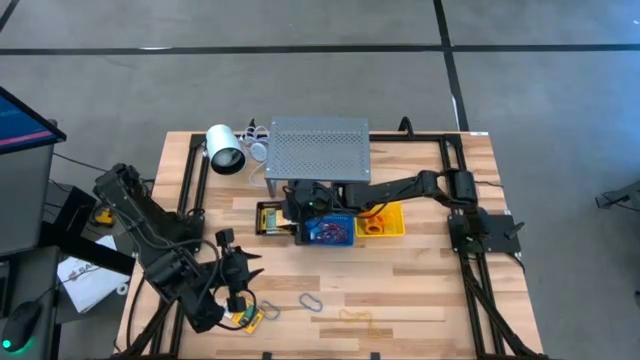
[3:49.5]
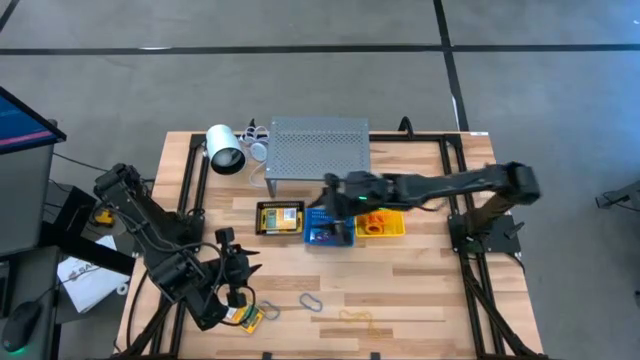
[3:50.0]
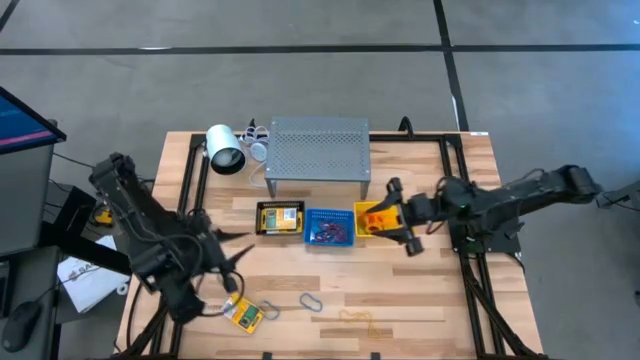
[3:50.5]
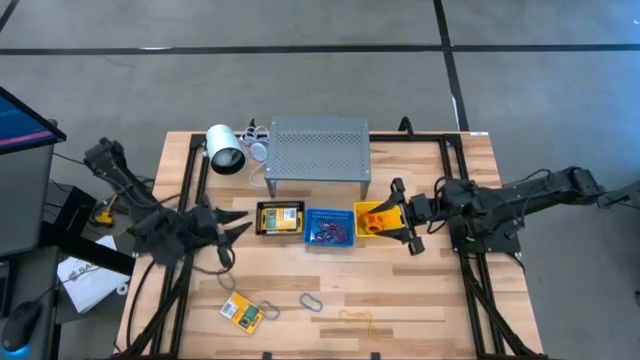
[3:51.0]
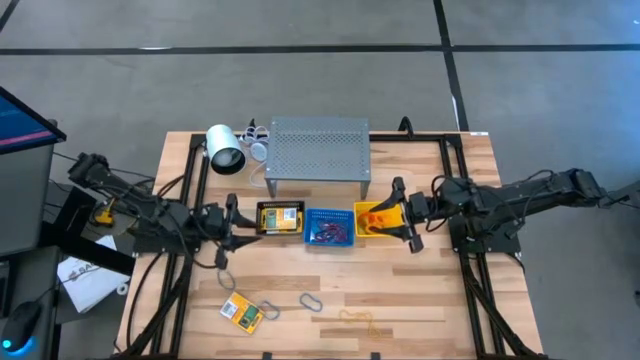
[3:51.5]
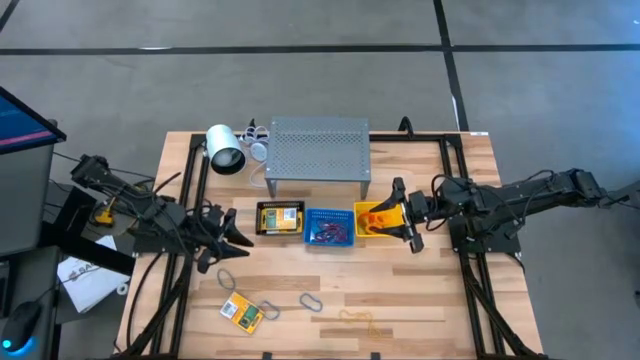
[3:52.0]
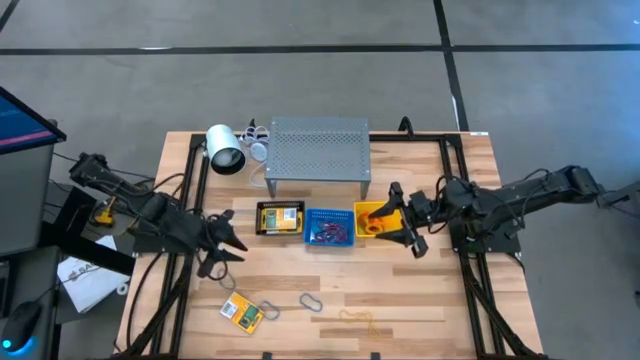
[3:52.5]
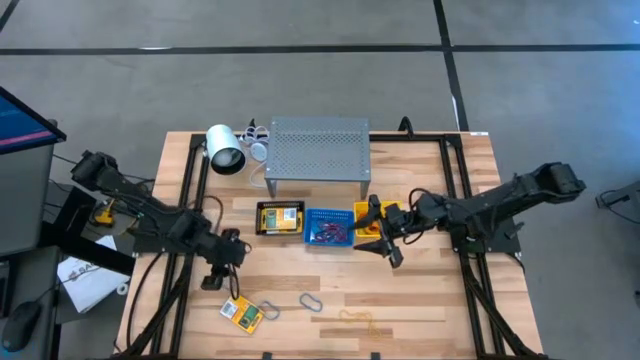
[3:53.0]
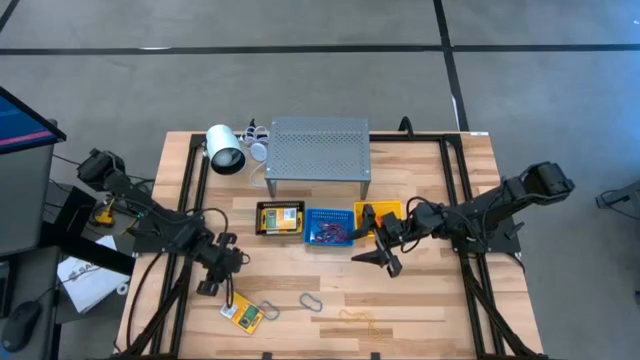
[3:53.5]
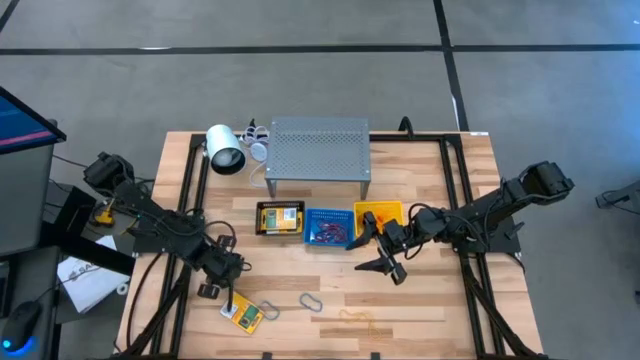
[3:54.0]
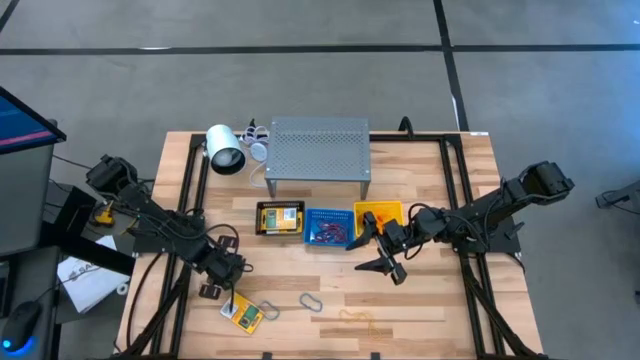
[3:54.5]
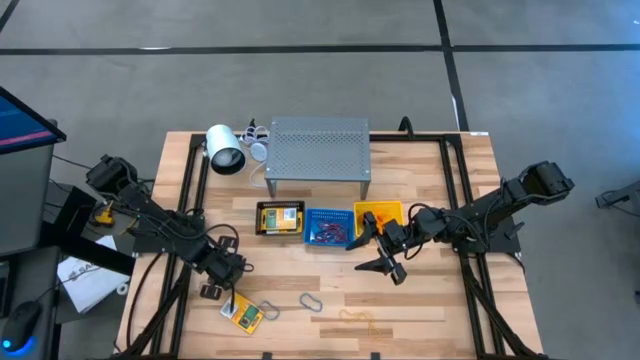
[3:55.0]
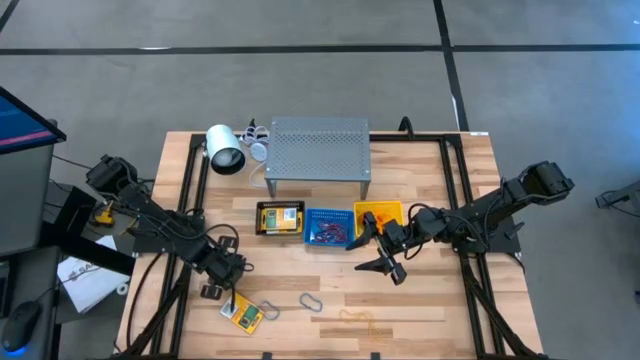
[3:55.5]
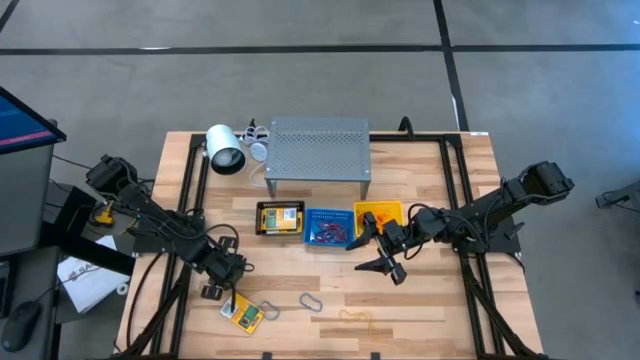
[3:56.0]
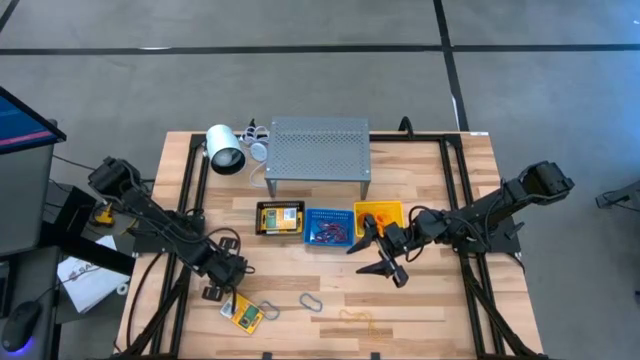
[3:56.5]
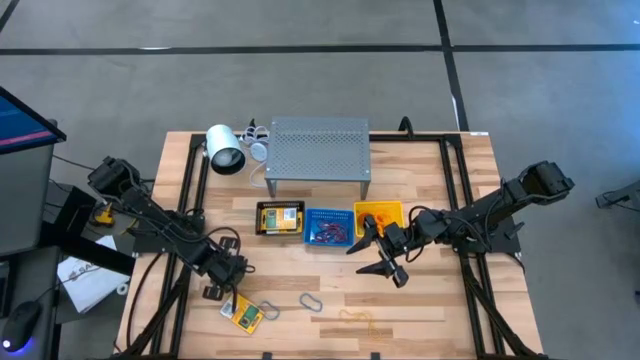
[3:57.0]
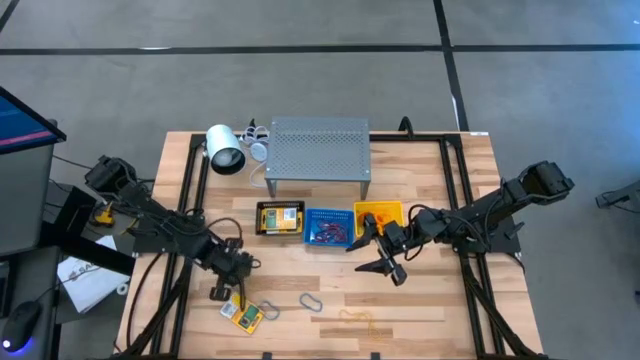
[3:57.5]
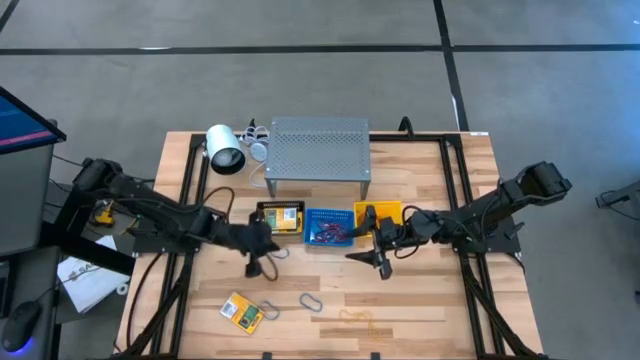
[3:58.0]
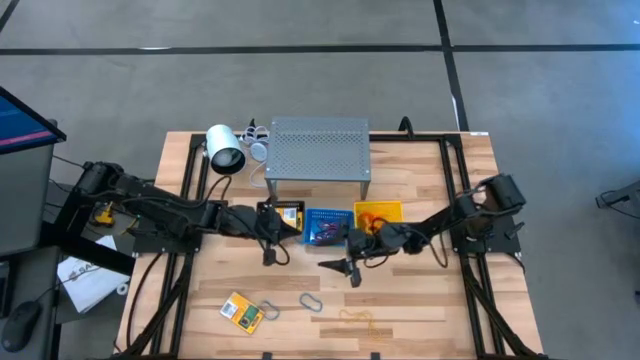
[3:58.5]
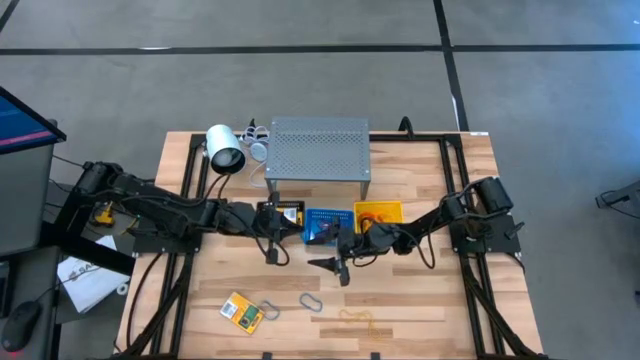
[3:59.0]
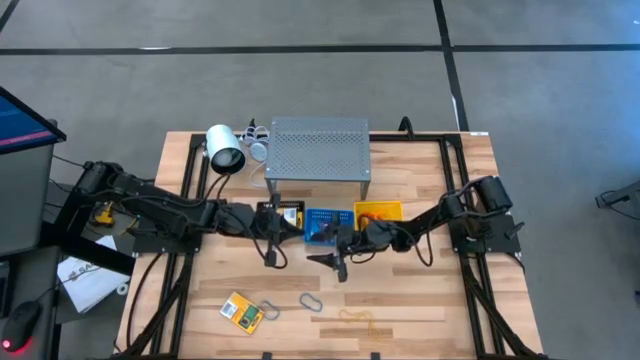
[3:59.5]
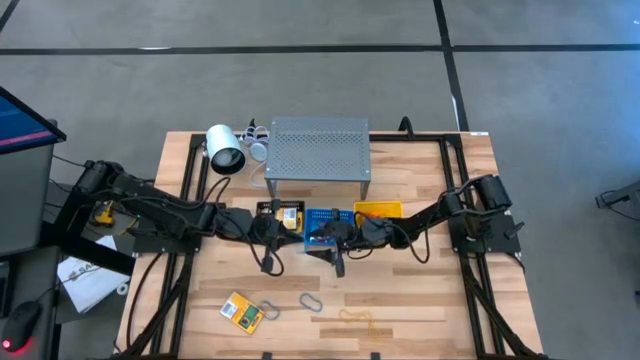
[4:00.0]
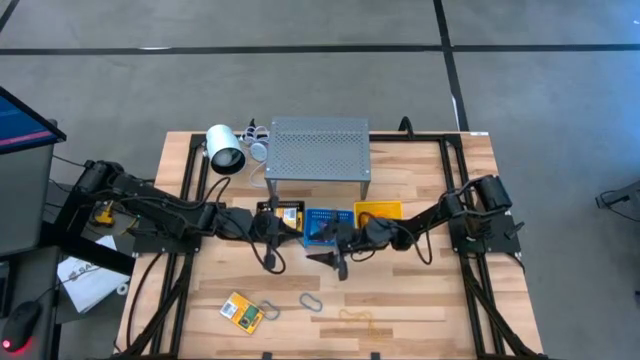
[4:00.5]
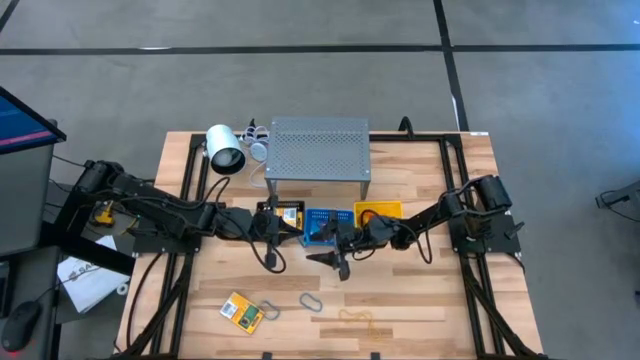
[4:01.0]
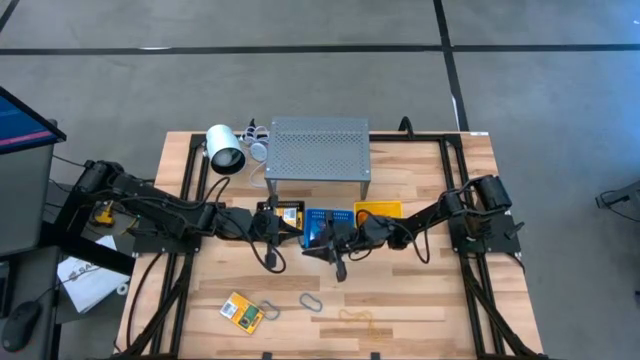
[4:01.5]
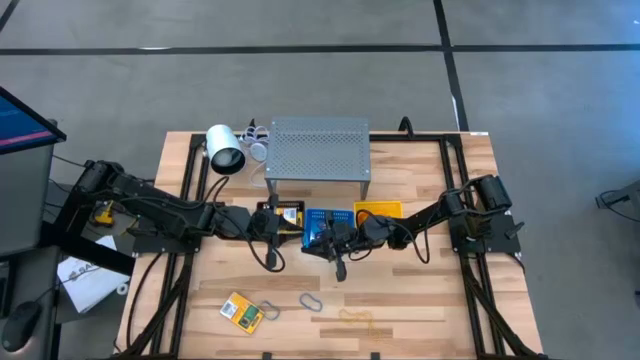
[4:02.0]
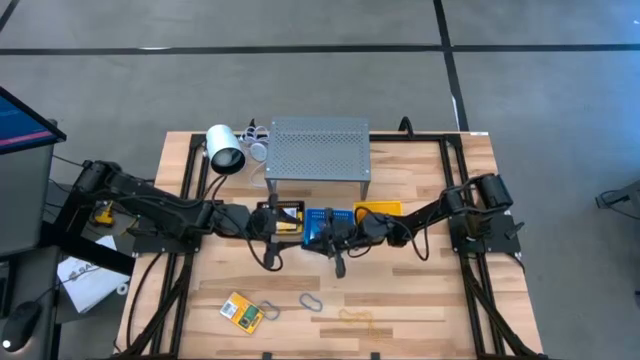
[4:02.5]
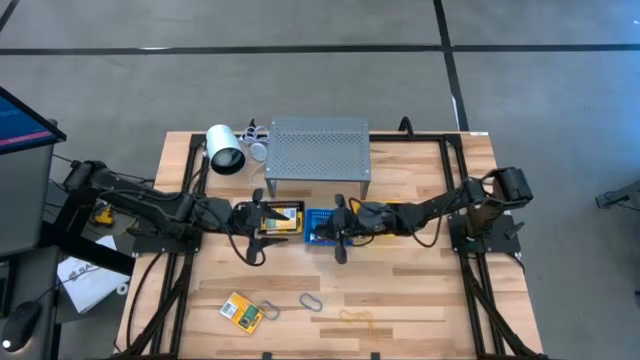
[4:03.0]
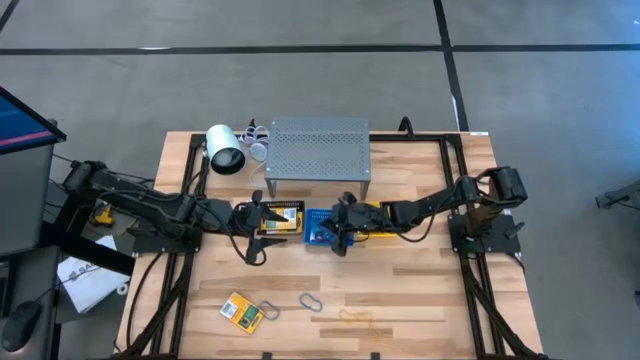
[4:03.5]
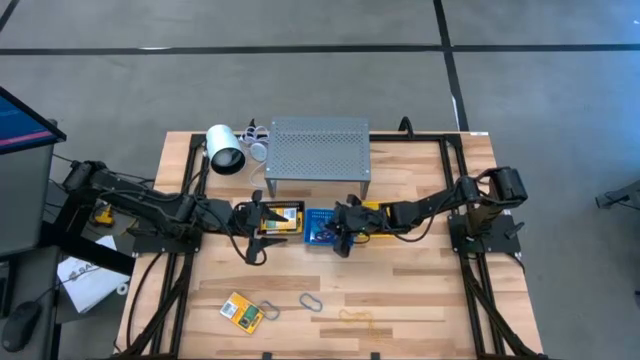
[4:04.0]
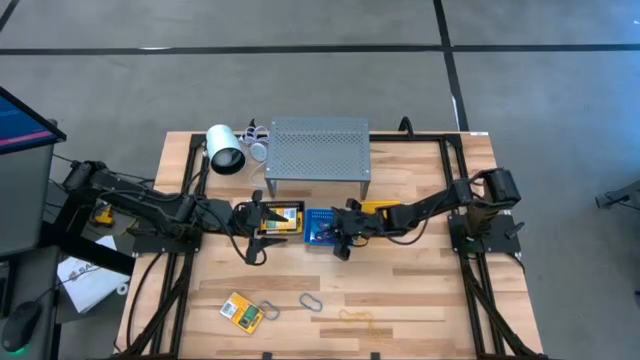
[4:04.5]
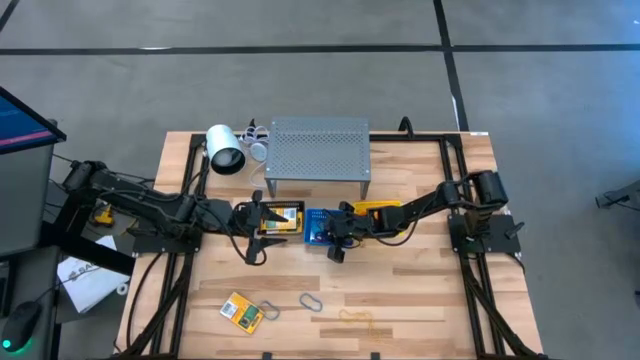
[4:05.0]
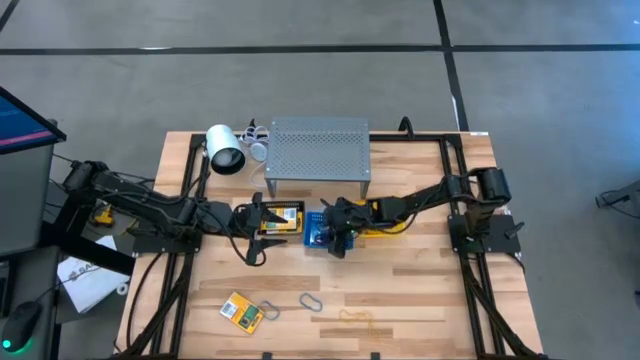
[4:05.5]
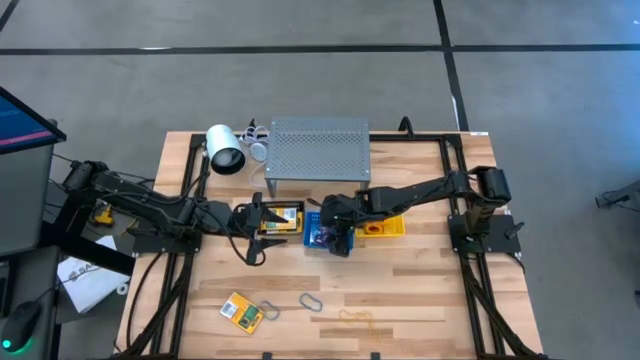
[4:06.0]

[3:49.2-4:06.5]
Task: Pick & Place Office Desk Supplies
Put the blue rubber band into the blue bin

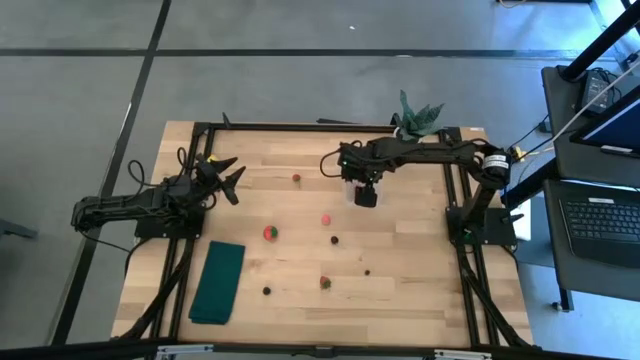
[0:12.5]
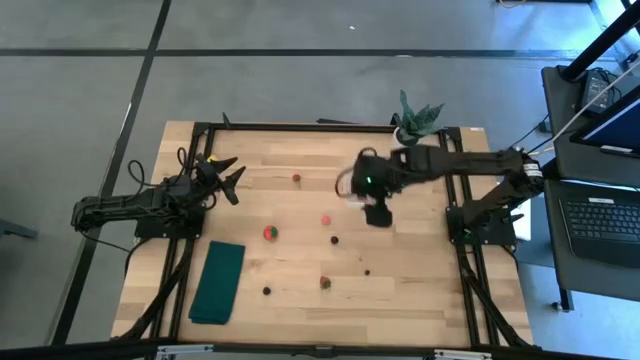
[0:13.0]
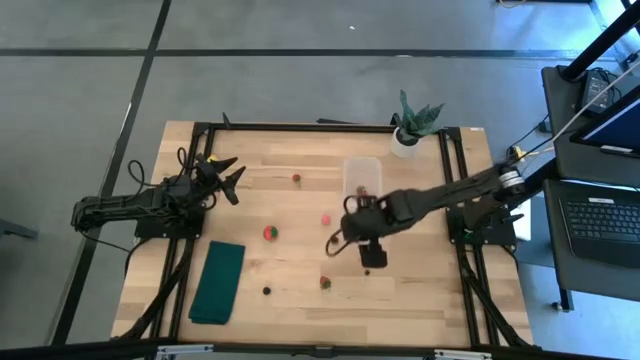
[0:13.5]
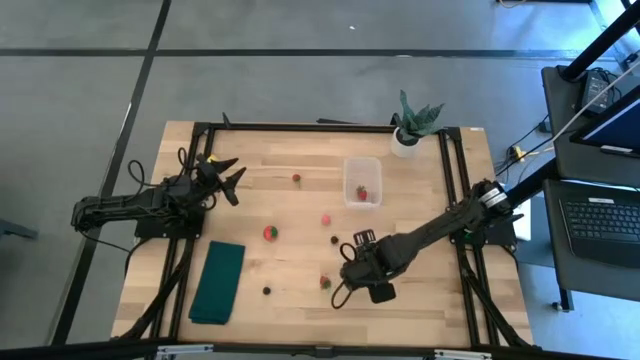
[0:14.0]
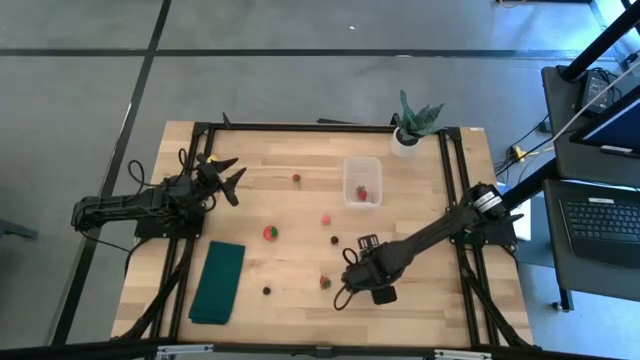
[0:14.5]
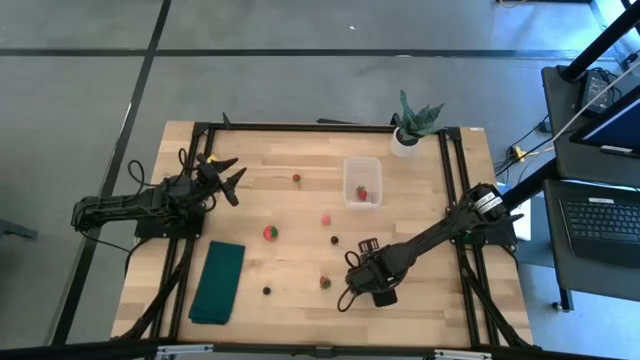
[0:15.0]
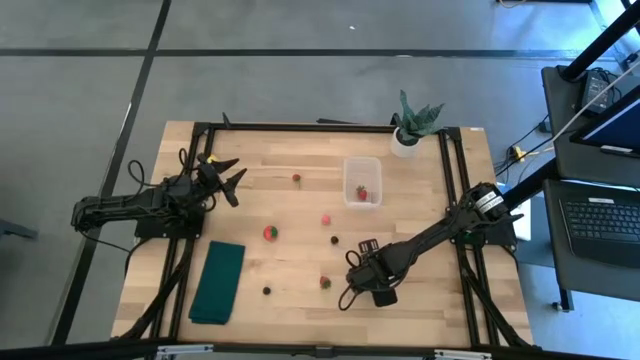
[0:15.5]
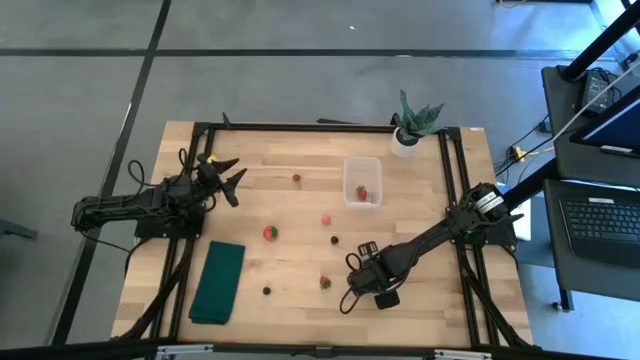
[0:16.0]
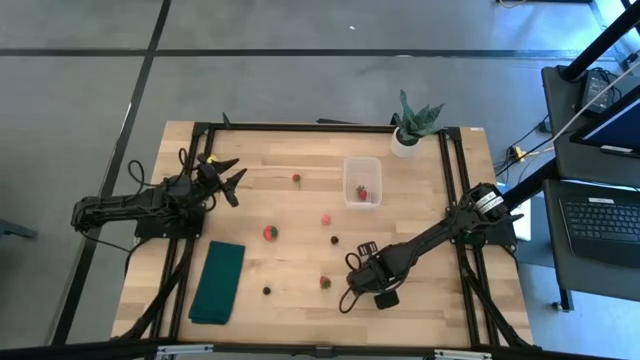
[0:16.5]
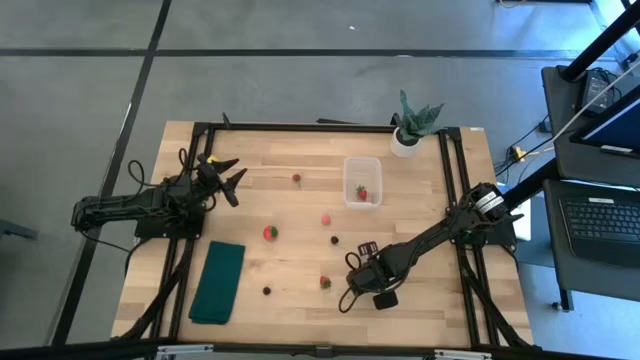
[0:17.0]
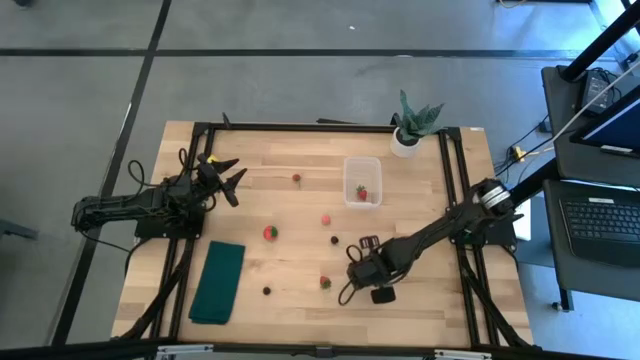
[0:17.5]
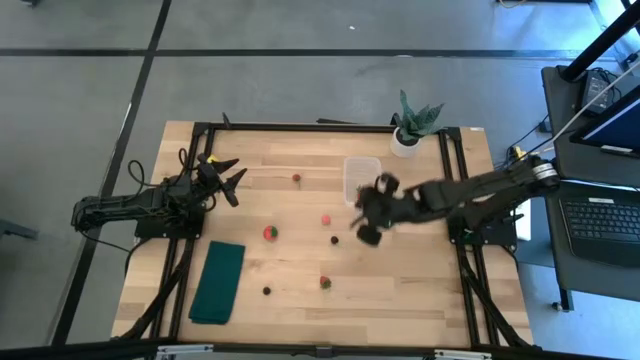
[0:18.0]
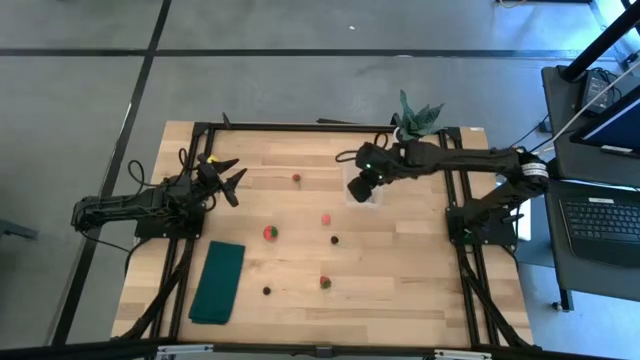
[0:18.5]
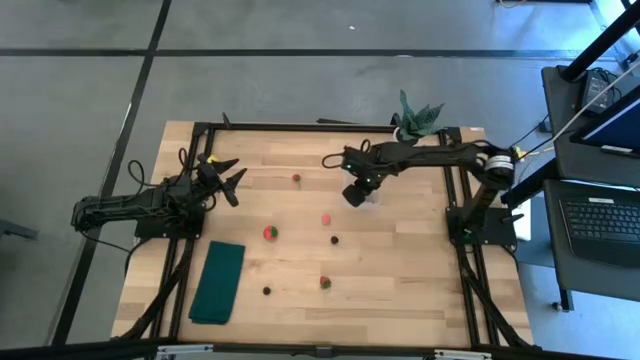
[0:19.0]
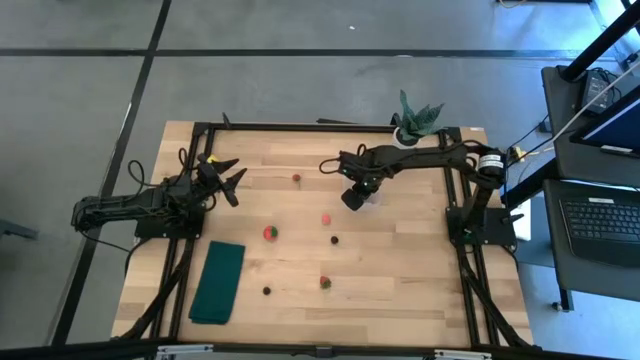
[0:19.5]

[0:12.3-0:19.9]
Task: Pick and placing Produce into tupperware
Put the blueberry into the transparent container
